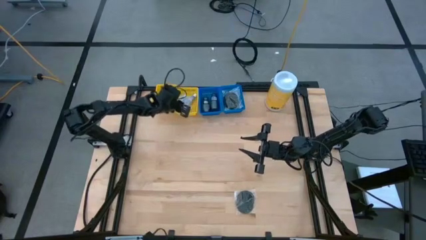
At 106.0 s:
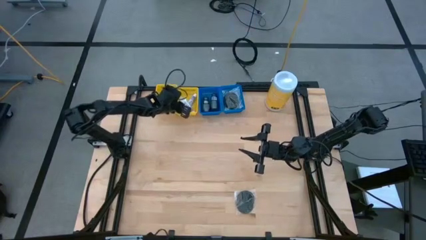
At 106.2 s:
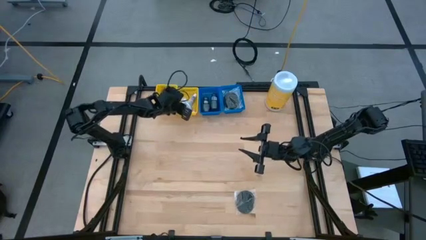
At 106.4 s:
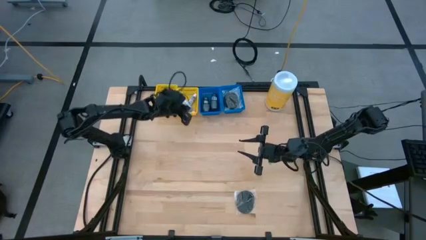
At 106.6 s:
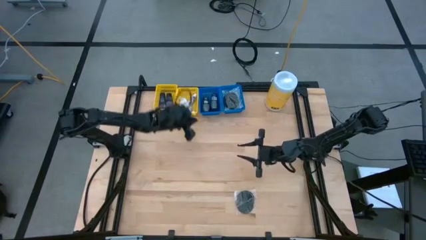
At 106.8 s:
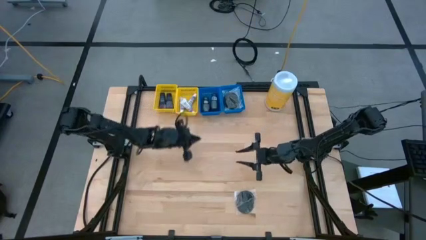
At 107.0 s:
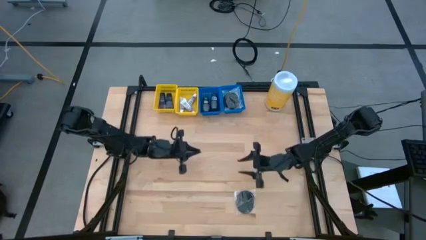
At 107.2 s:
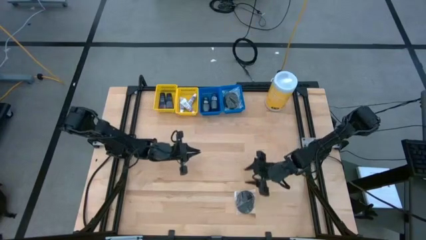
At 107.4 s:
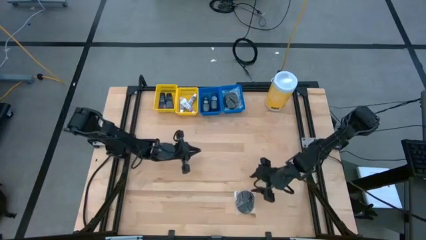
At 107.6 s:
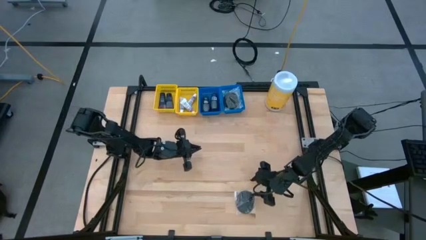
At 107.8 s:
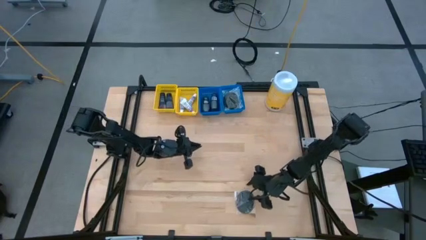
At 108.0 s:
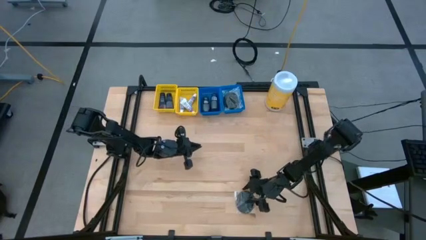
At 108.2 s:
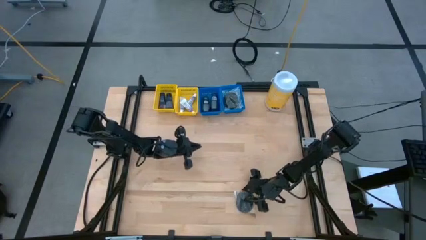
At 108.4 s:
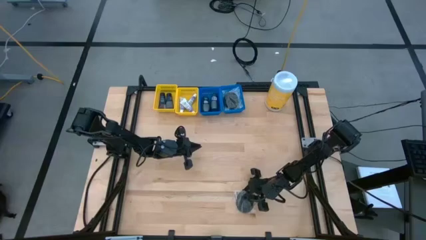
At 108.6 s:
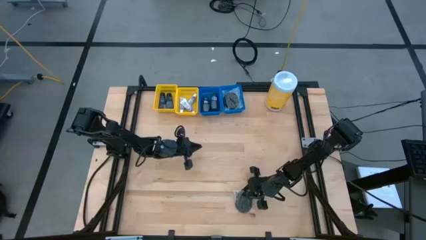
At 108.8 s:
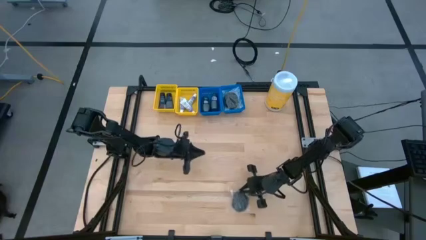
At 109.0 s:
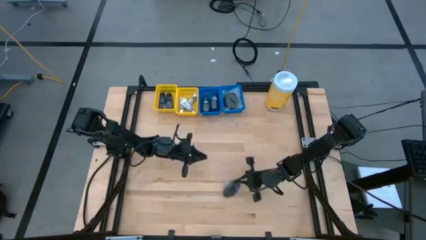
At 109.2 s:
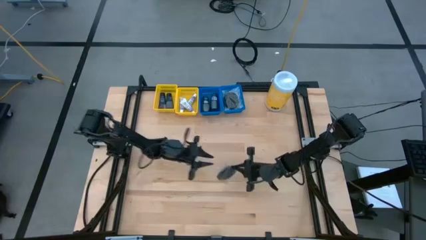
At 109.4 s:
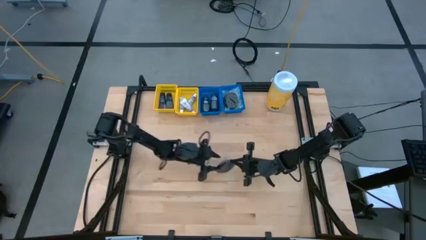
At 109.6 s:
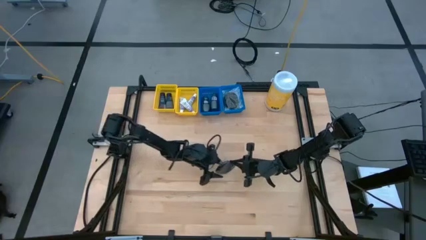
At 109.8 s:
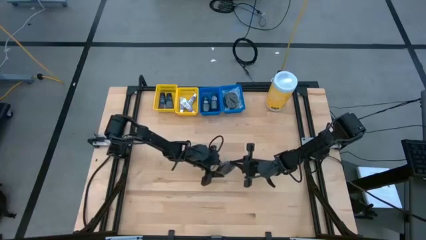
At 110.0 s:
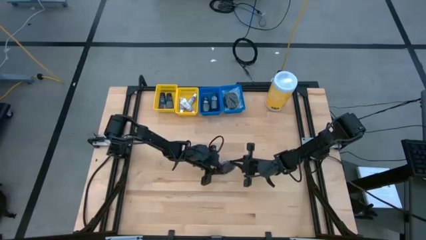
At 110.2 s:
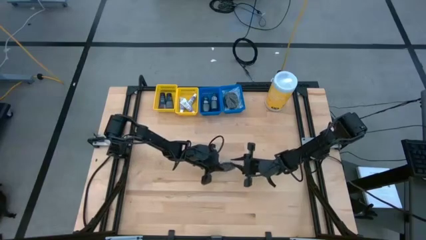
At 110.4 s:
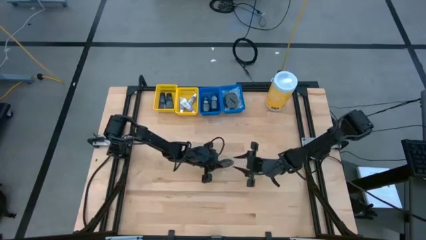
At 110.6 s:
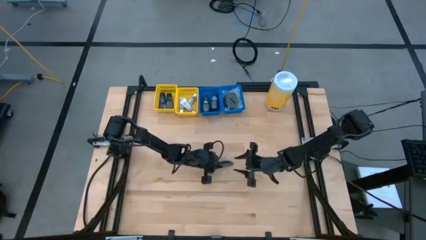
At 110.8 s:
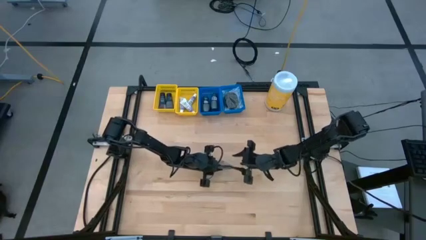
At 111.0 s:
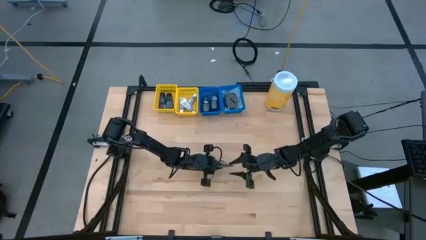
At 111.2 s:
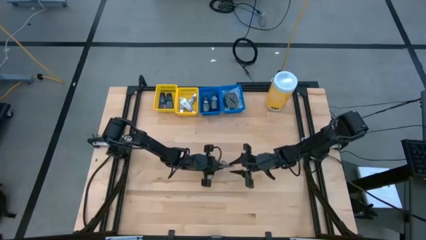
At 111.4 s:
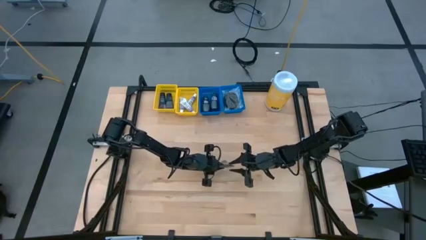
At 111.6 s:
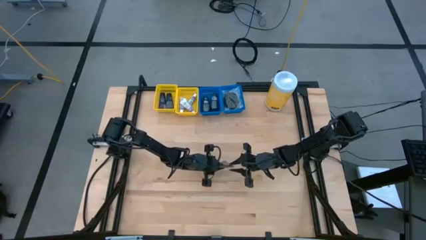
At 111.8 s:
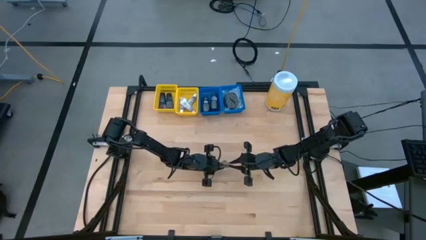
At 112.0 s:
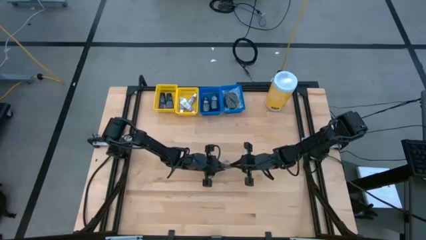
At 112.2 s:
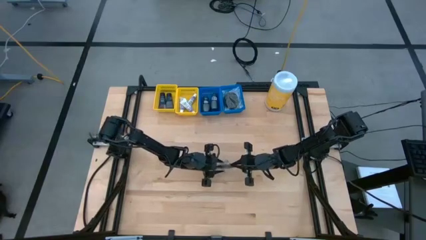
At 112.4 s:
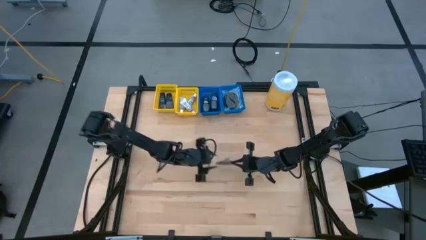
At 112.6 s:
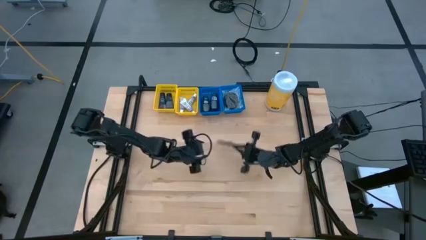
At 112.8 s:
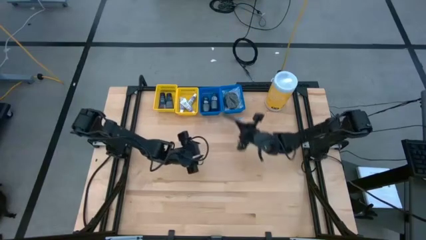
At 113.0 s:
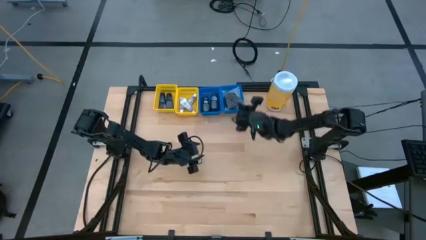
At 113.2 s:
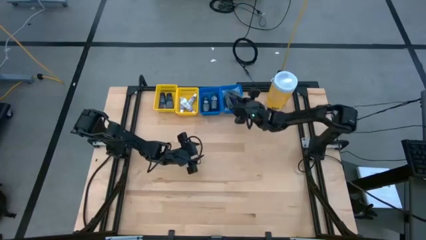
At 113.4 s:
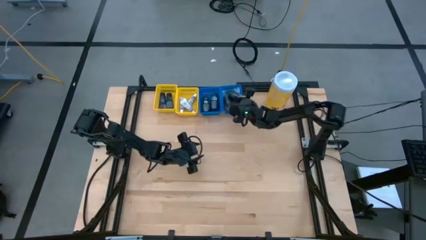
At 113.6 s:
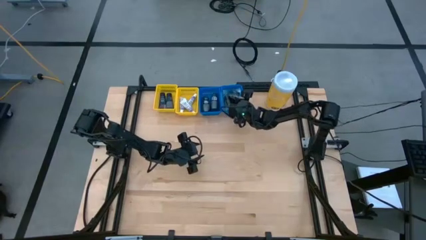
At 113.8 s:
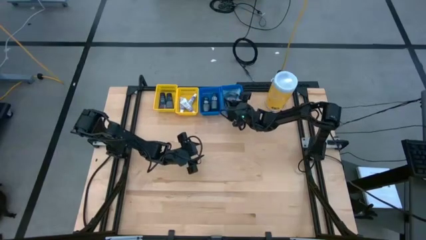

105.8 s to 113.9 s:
Task: Pick & Place Travel size toiletries
Put the black hairbrush into the right blue bin

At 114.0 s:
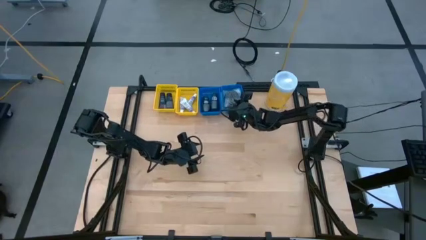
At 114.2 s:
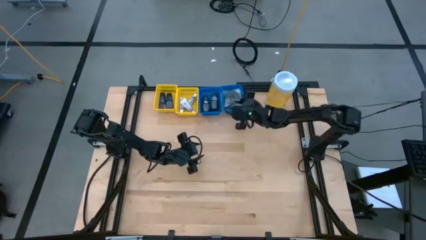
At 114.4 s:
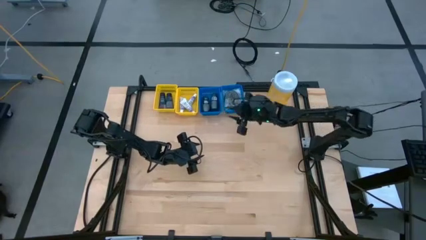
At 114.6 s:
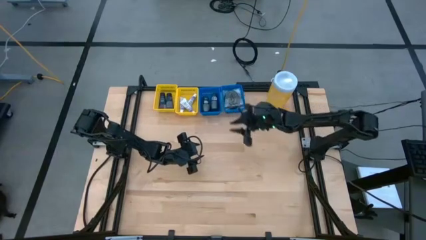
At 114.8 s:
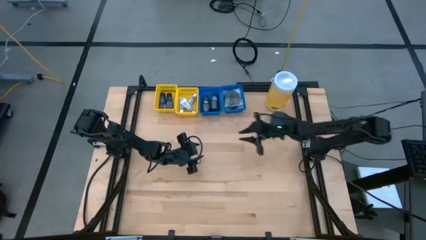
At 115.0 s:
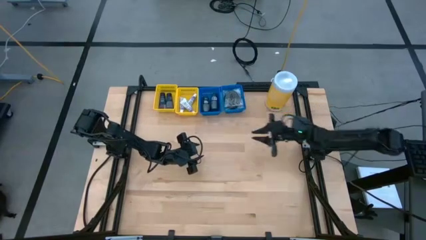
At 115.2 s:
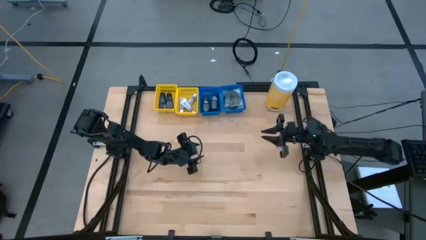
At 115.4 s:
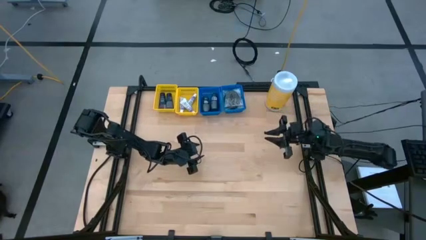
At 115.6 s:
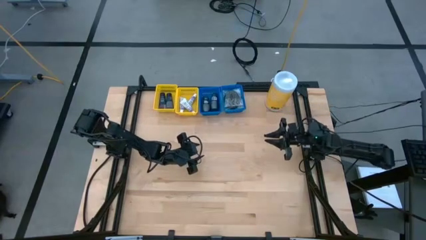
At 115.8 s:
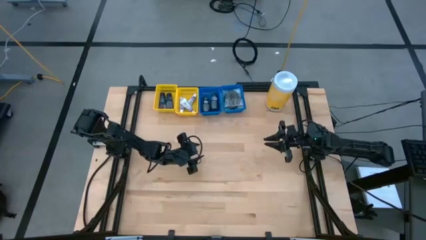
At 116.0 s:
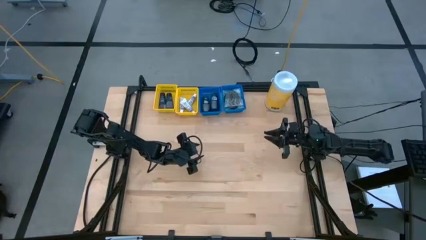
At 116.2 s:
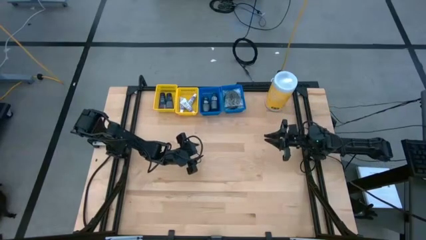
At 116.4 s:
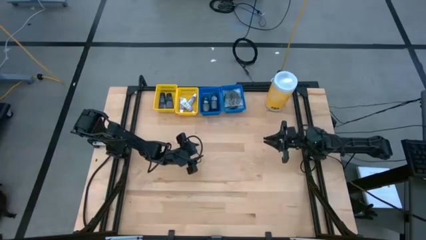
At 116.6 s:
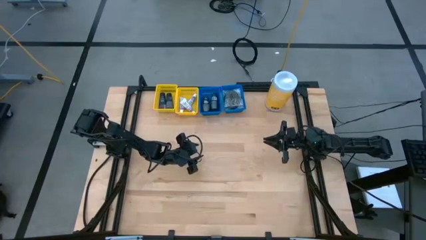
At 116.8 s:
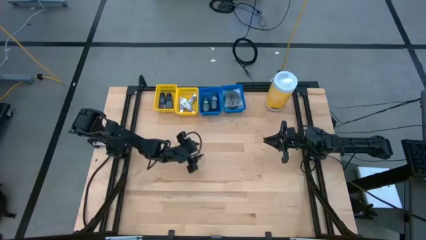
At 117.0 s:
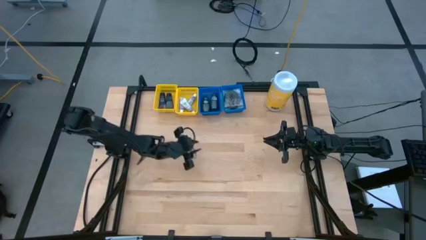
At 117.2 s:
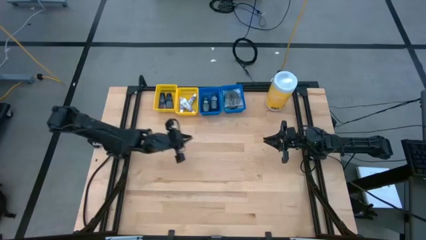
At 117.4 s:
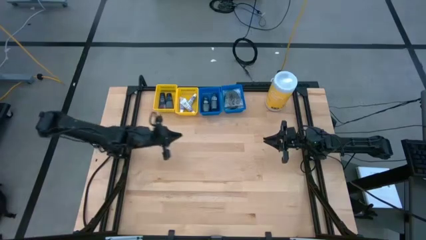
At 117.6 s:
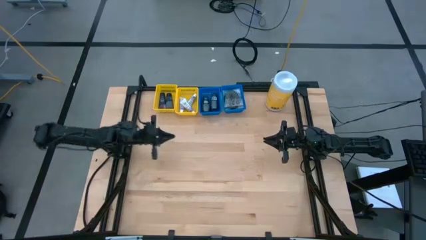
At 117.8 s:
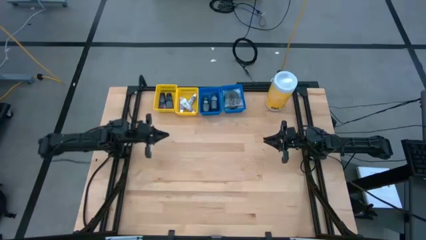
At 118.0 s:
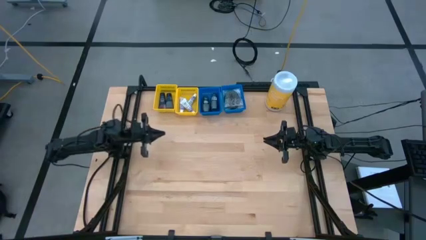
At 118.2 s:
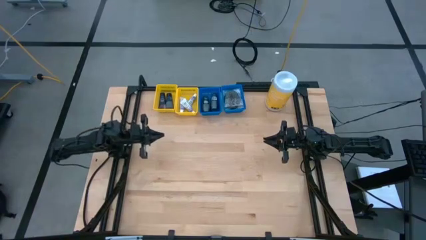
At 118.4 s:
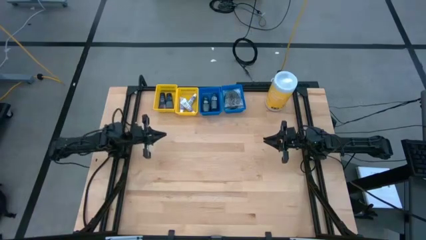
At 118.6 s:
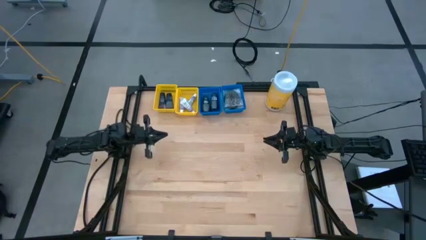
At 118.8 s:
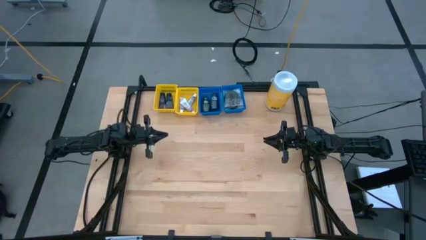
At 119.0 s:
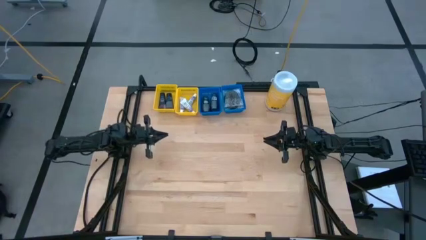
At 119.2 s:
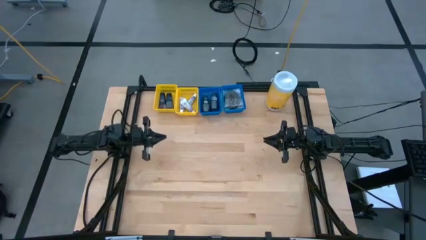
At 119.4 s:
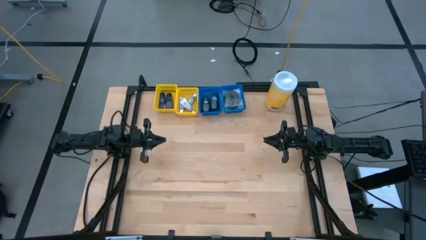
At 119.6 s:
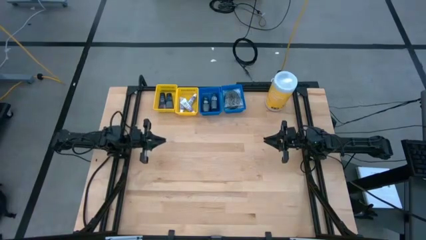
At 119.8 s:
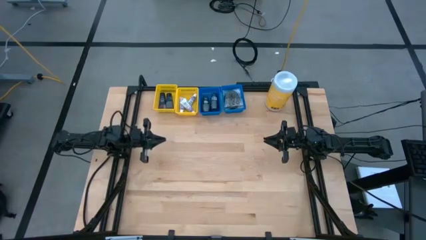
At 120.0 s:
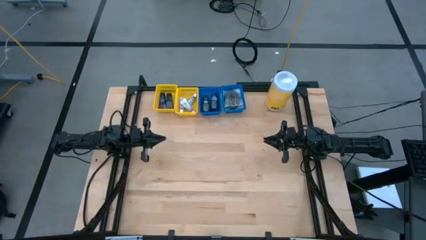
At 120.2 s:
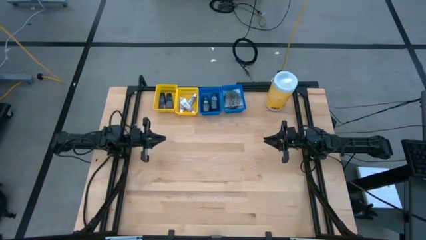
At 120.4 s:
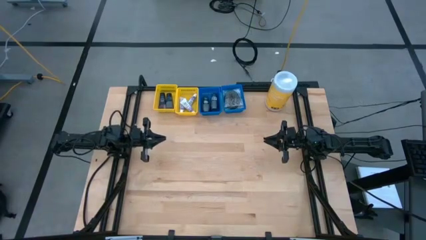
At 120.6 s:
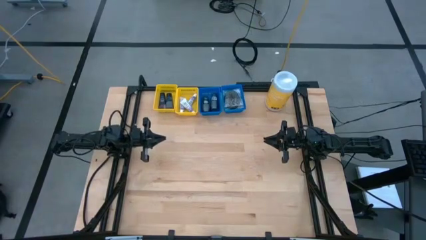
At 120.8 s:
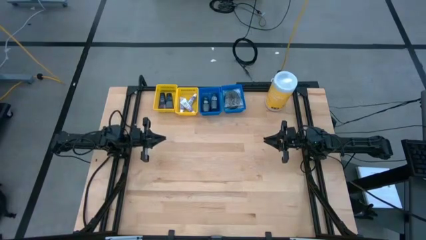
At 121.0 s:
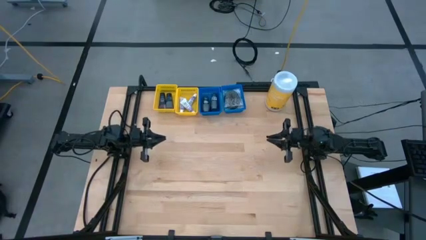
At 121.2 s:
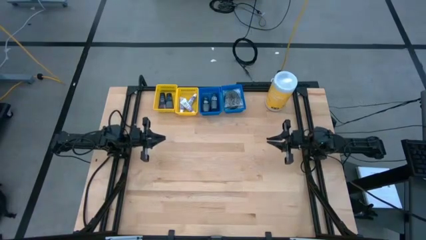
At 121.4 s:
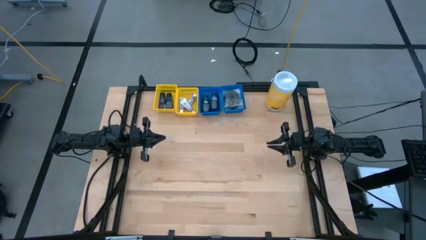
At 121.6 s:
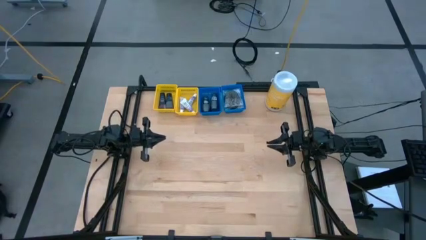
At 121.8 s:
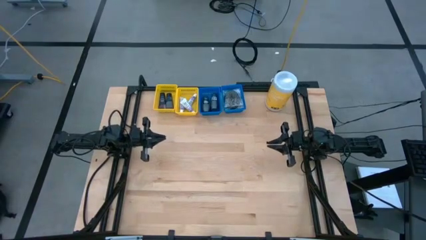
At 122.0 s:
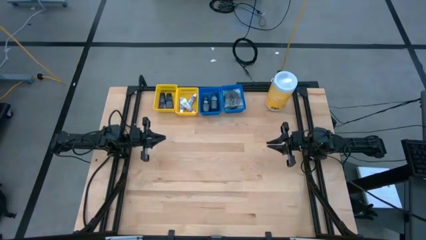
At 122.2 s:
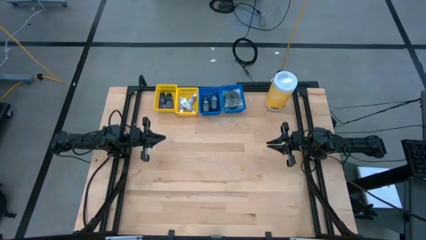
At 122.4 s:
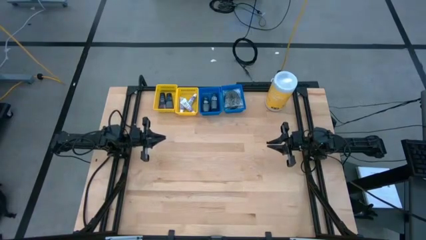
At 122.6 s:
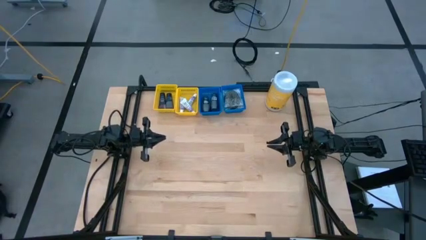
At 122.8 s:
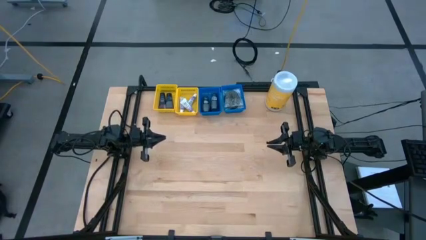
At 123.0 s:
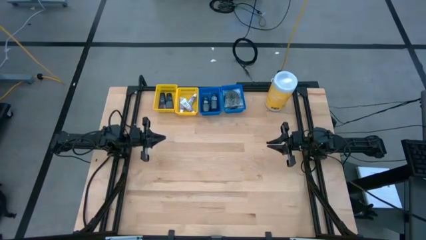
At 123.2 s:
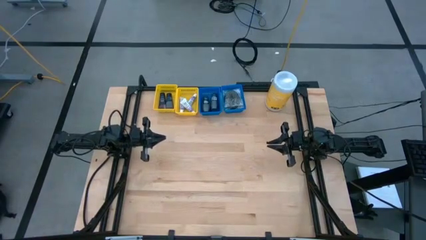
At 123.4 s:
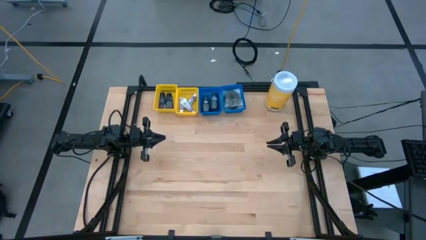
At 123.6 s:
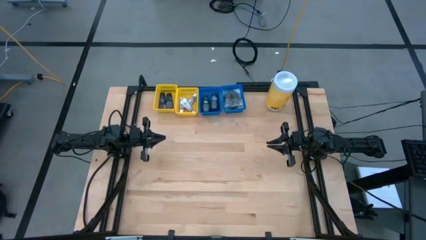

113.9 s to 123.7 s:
Return to Home Position
